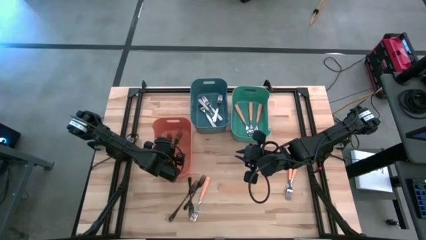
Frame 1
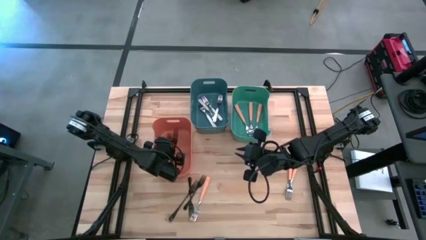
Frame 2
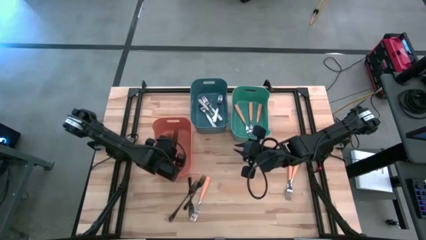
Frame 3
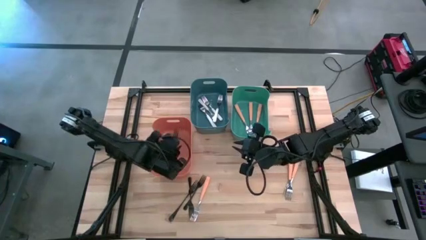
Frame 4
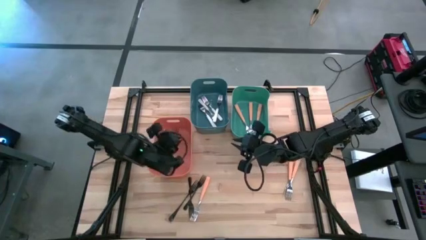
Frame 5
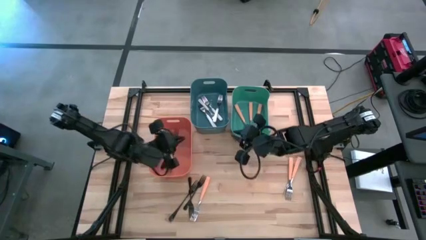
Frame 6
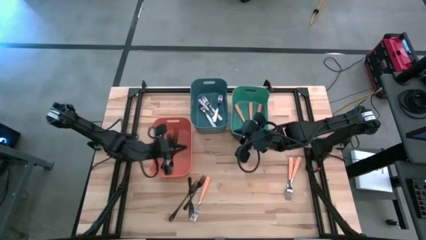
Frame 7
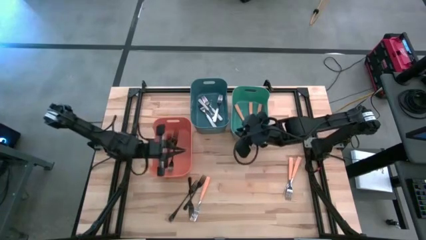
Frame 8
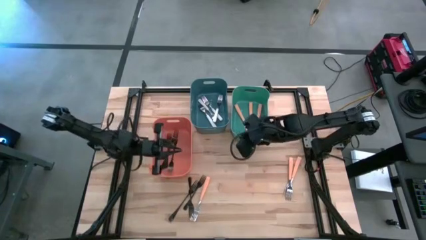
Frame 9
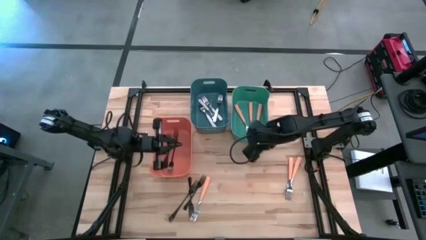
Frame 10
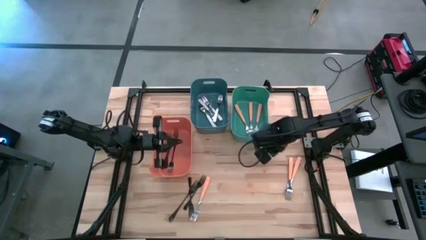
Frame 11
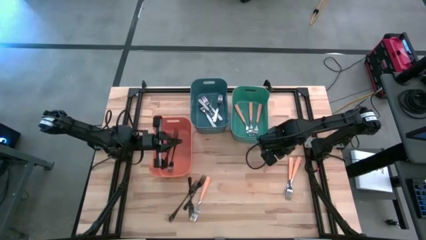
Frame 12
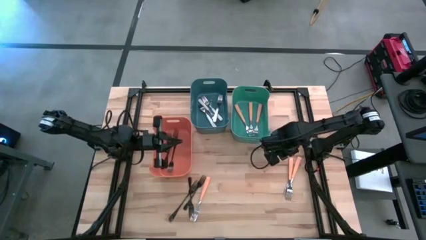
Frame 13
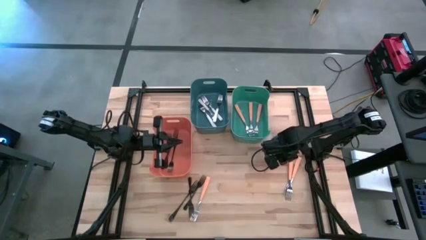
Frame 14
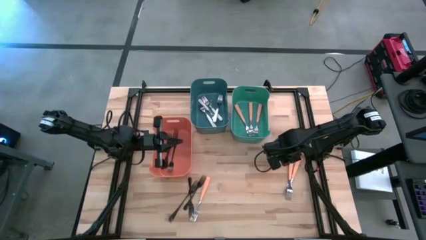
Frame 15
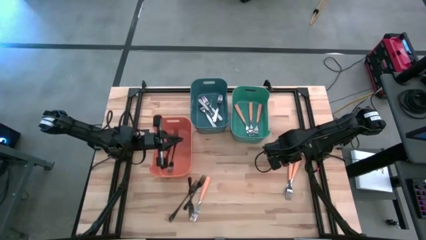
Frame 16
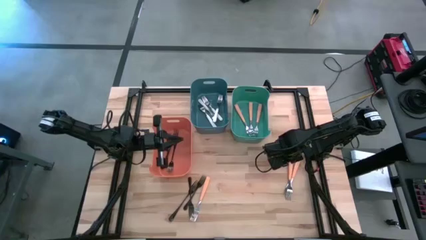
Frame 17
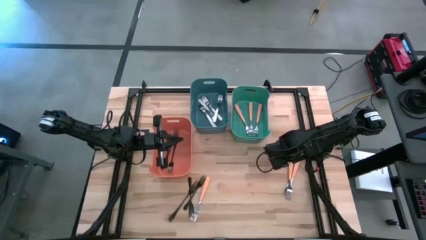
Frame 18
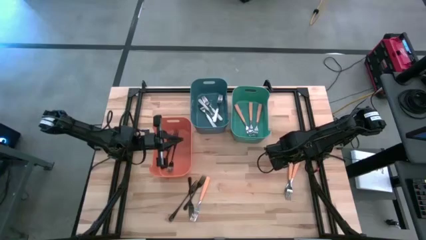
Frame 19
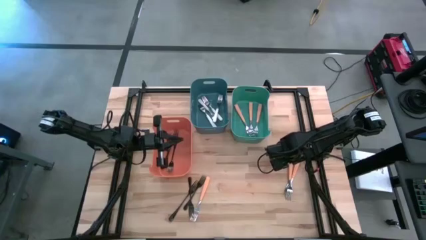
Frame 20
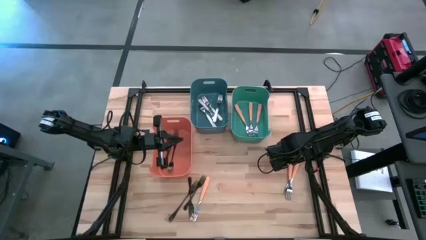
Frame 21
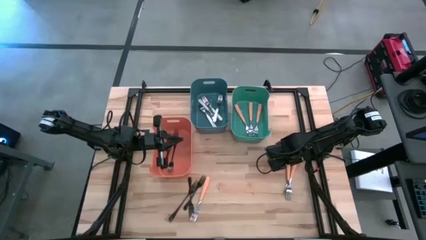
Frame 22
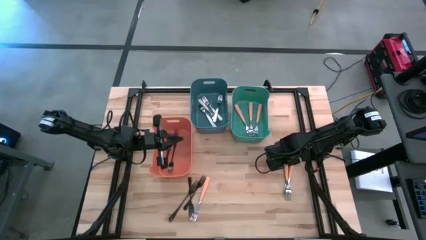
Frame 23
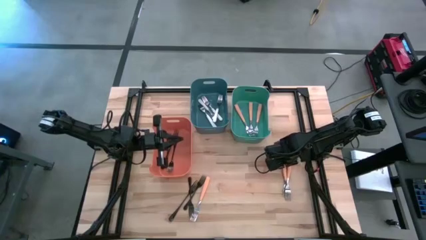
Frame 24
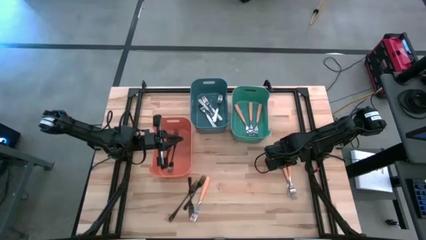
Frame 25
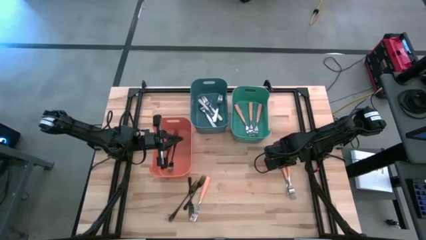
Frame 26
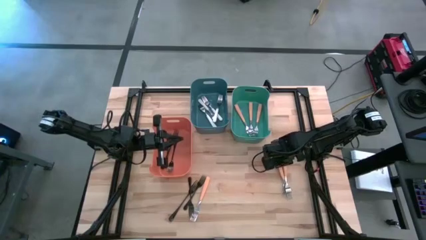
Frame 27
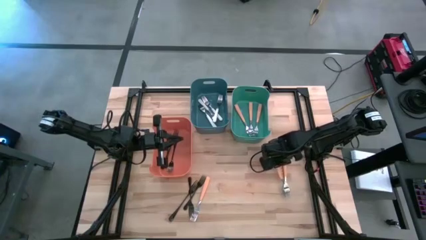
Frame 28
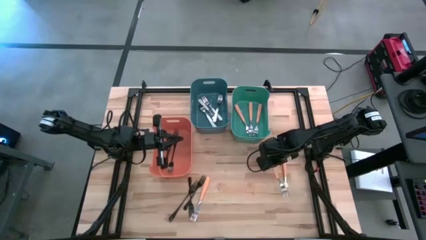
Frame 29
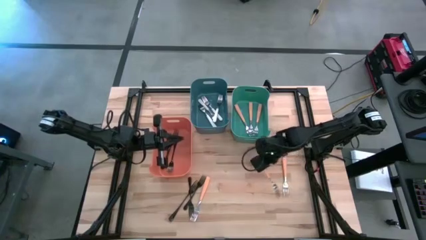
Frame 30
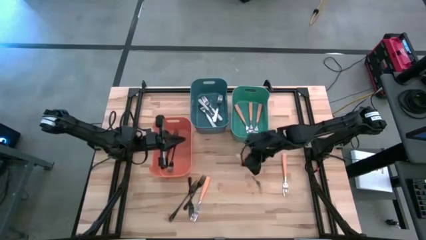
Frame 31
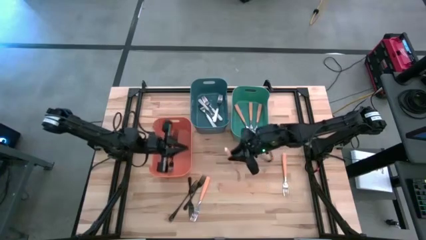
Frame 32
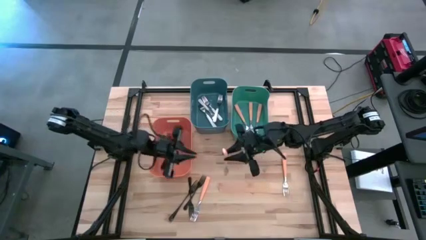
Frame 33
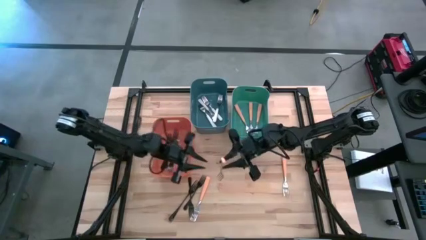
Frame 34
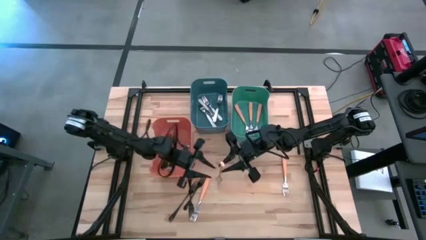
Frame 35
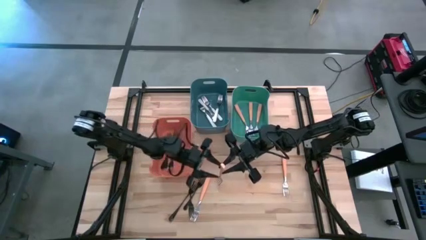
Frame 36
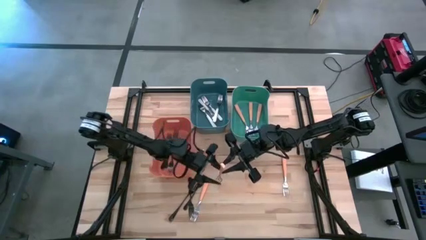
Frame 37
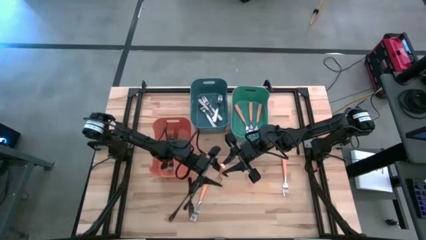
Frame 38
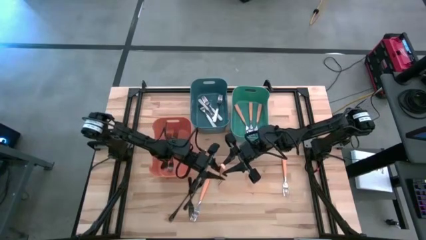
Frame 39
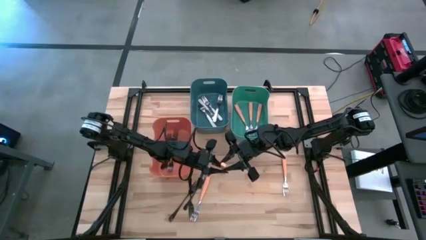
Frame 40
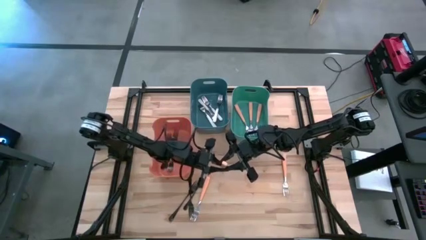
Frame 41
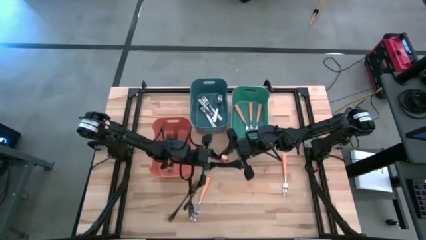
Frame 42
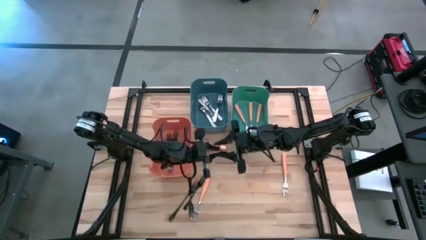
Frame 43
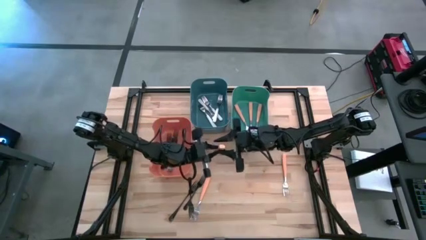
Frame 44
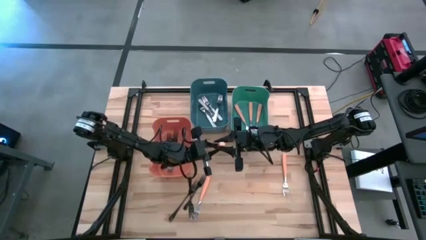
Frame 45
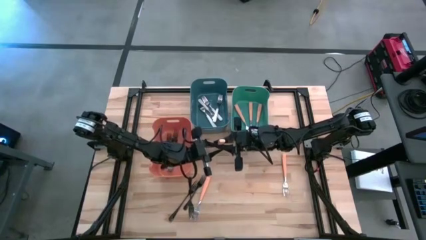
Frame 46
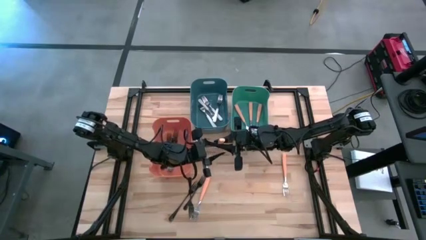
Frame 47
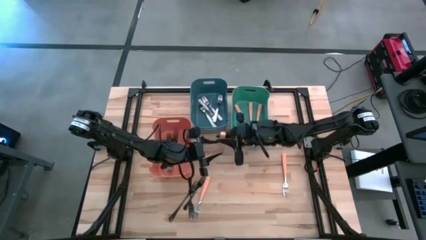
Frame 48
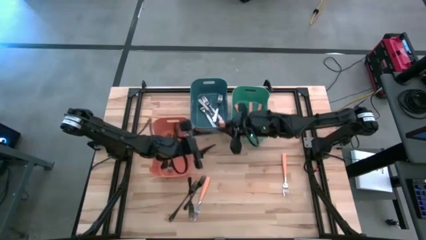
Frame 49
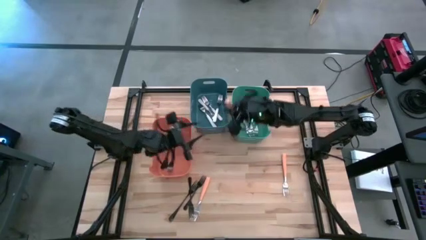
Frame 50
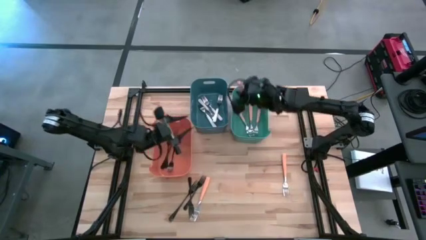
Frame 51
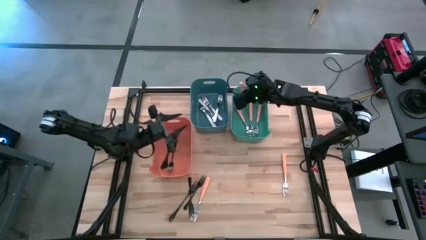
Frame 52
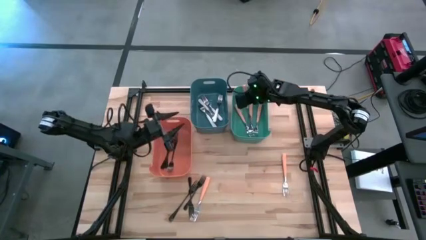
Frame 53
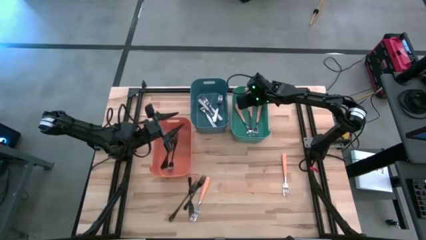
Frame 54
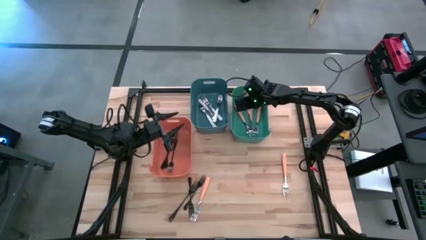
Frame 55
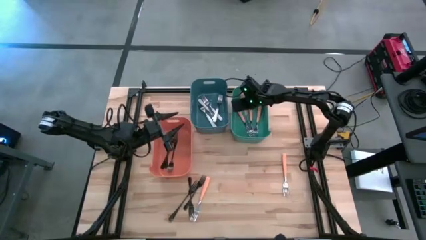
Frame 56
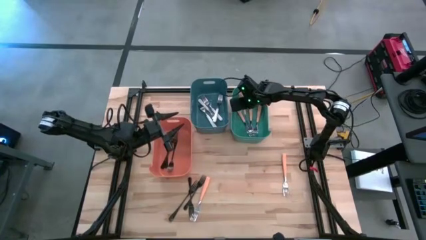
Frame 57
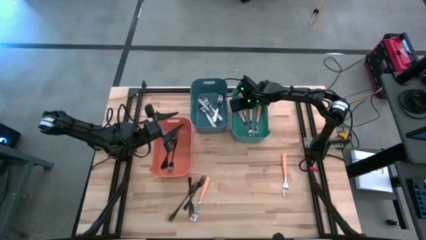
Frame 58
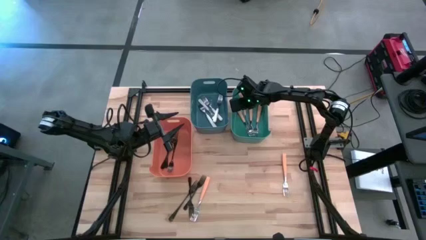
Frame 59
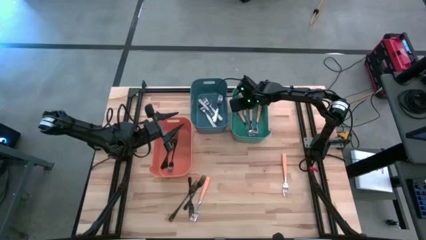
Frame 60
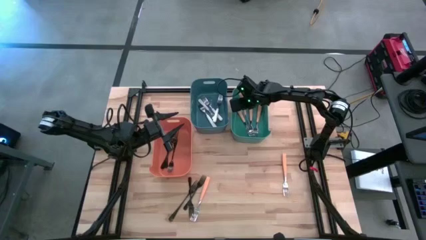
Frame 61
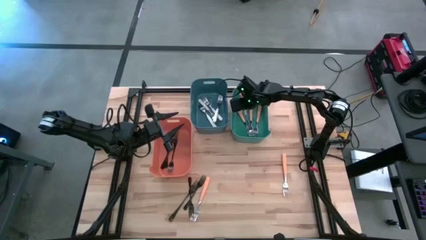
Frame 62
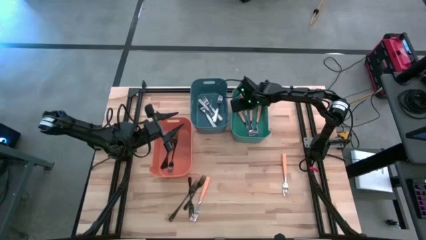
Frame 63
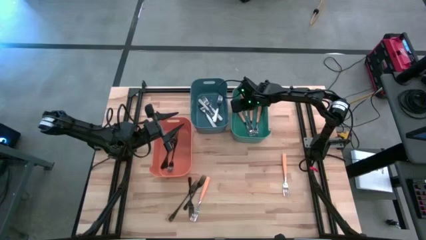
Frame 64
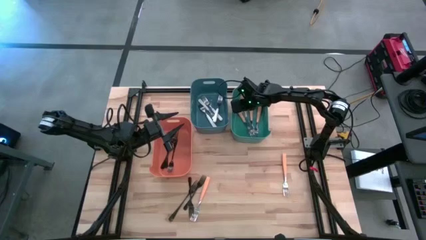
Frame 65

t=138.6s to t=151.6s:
Task: Sort silverware by color (type)
Put the orange fork into the green bin
